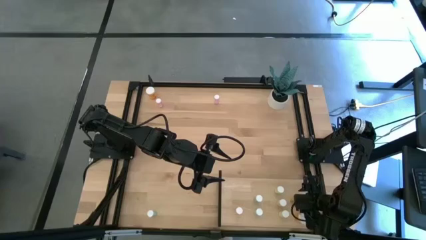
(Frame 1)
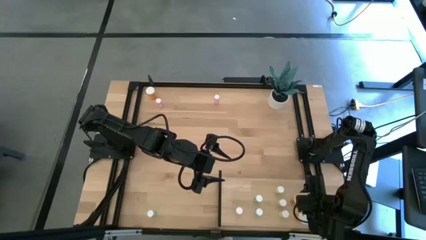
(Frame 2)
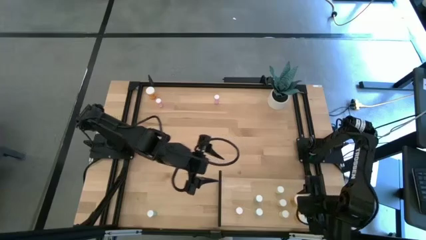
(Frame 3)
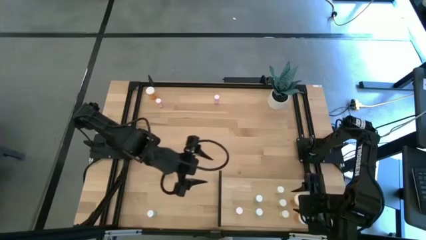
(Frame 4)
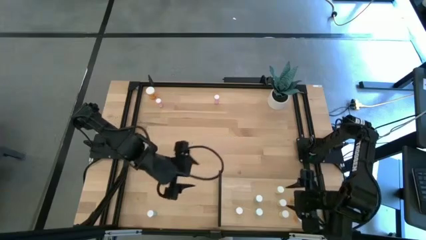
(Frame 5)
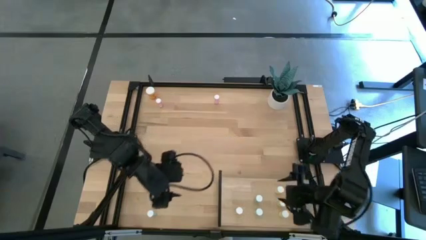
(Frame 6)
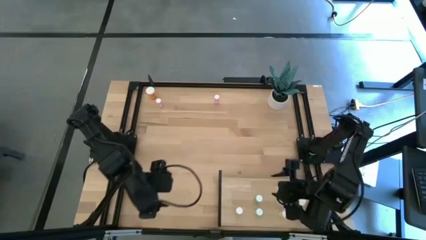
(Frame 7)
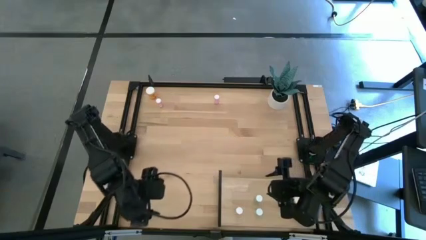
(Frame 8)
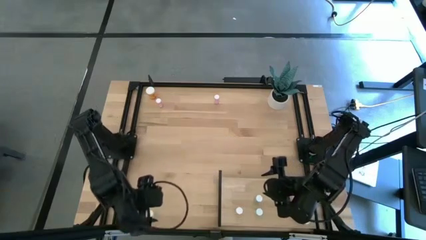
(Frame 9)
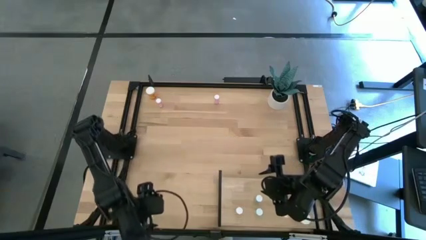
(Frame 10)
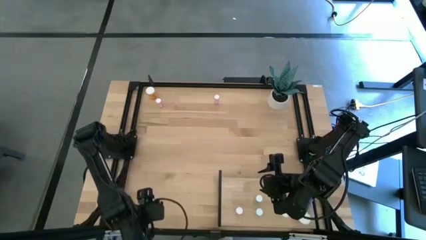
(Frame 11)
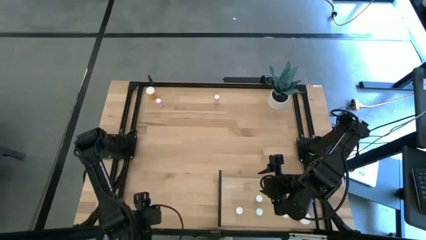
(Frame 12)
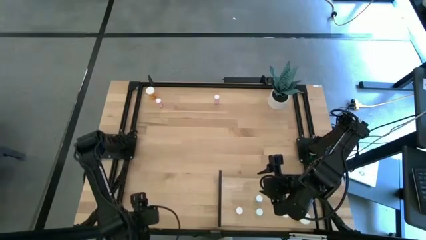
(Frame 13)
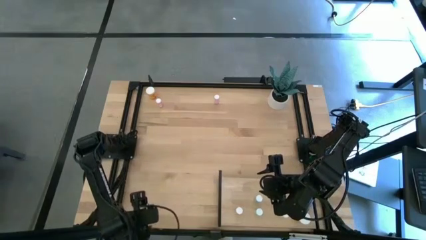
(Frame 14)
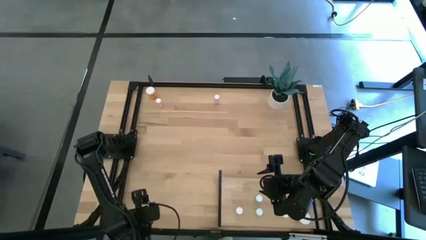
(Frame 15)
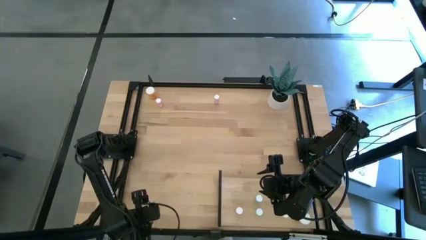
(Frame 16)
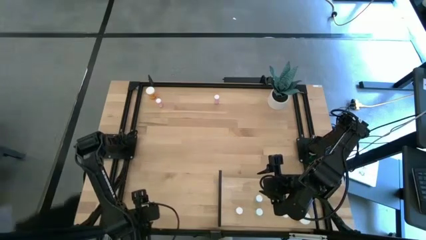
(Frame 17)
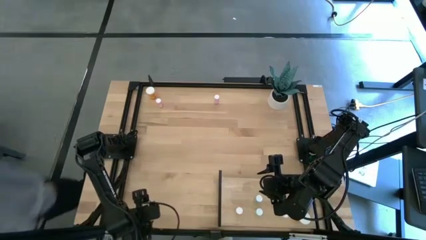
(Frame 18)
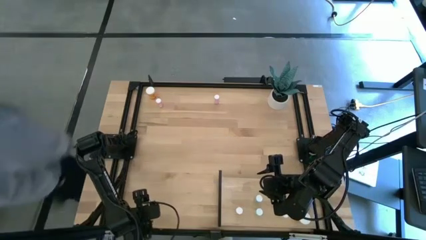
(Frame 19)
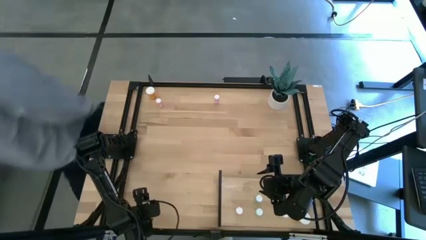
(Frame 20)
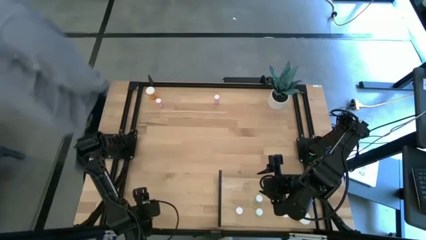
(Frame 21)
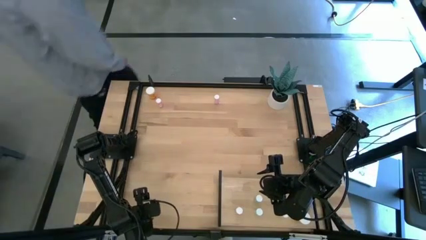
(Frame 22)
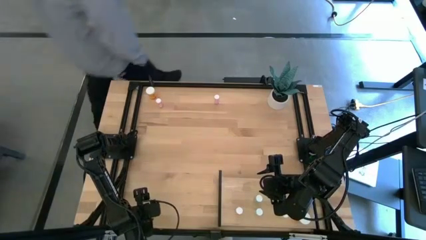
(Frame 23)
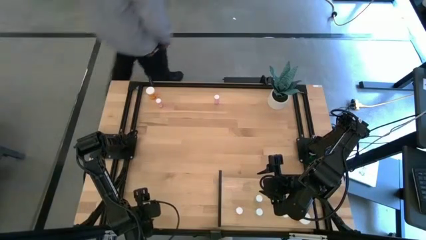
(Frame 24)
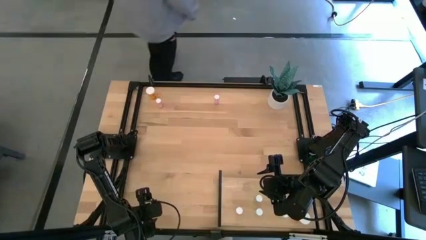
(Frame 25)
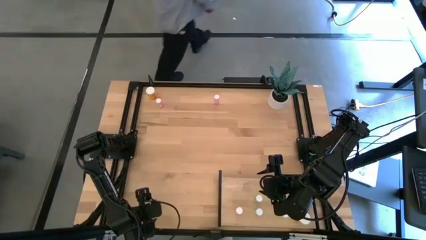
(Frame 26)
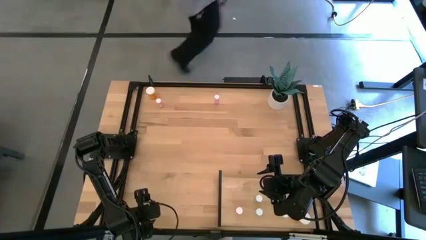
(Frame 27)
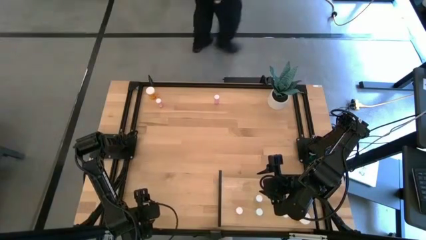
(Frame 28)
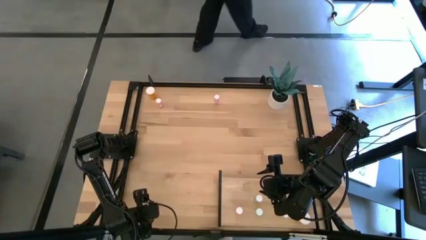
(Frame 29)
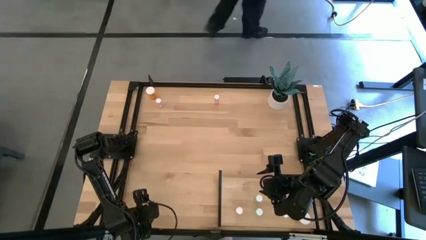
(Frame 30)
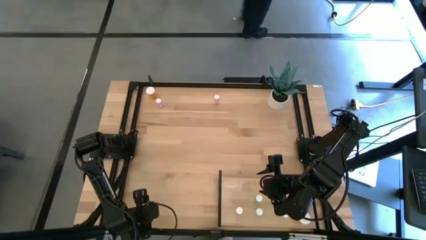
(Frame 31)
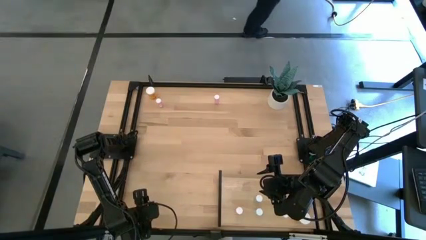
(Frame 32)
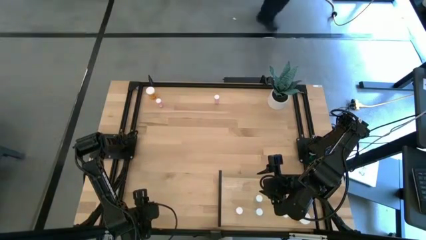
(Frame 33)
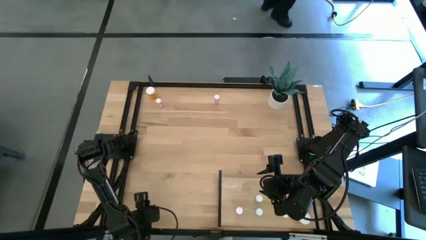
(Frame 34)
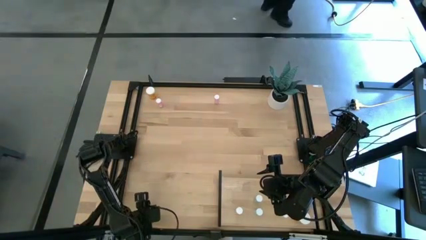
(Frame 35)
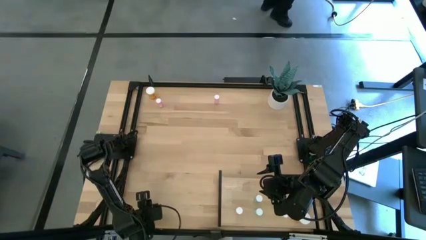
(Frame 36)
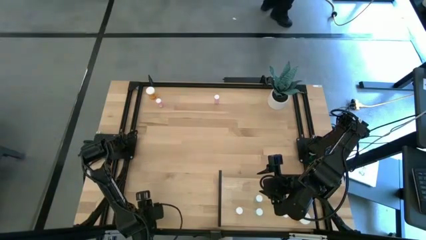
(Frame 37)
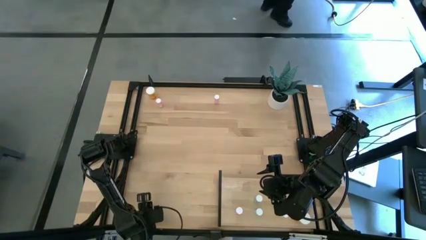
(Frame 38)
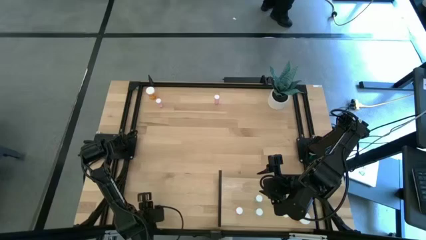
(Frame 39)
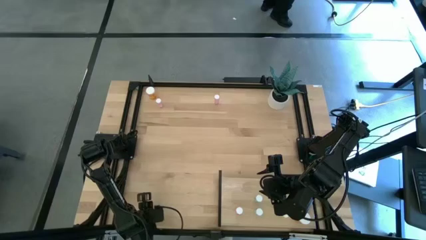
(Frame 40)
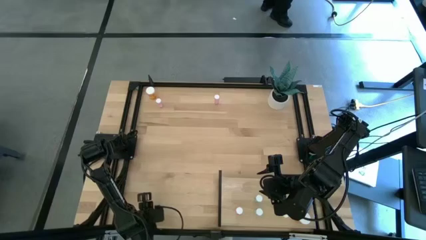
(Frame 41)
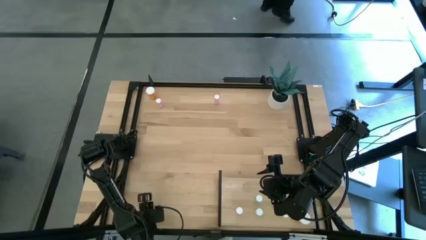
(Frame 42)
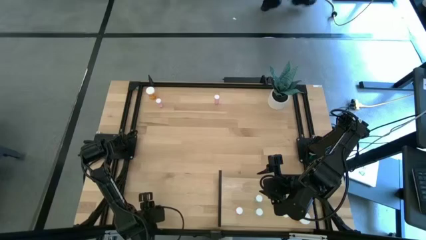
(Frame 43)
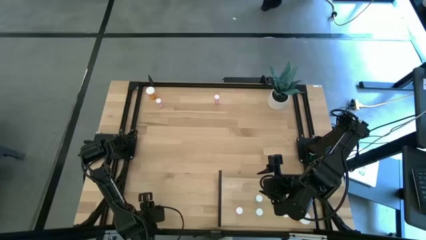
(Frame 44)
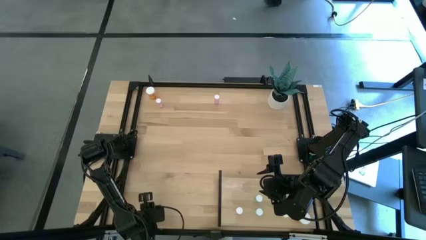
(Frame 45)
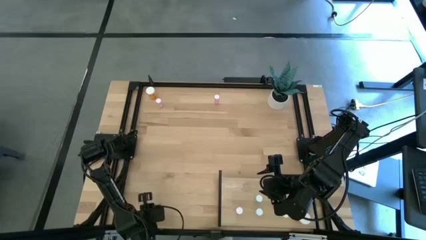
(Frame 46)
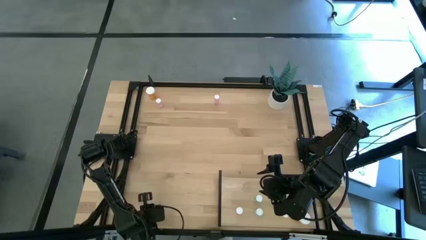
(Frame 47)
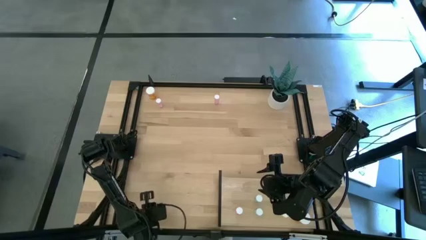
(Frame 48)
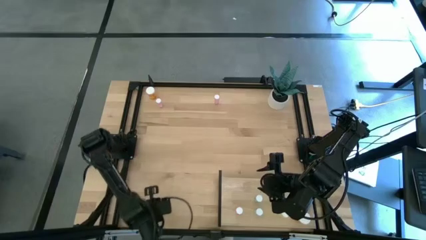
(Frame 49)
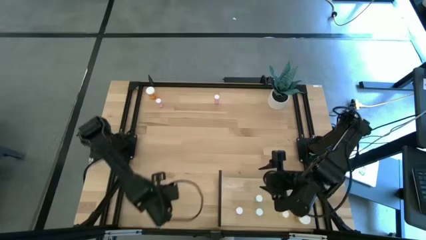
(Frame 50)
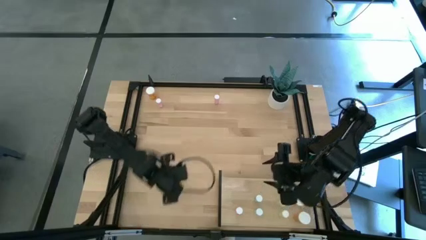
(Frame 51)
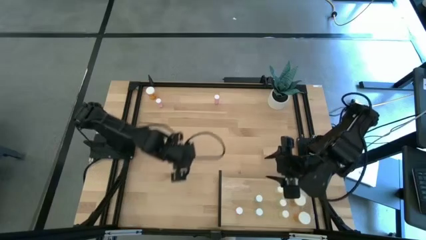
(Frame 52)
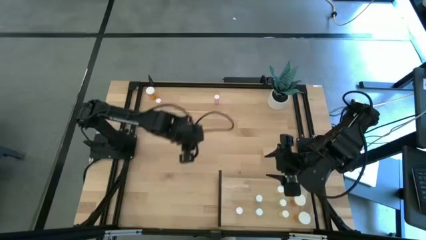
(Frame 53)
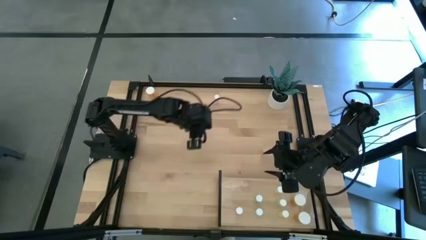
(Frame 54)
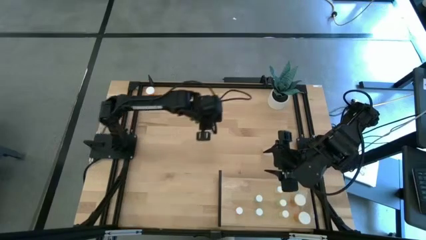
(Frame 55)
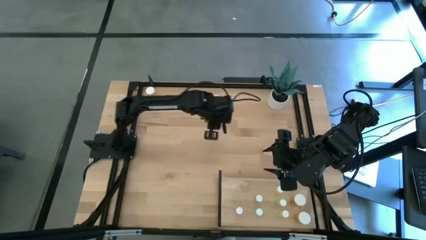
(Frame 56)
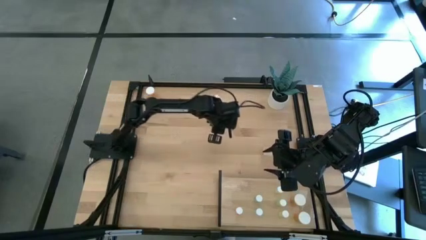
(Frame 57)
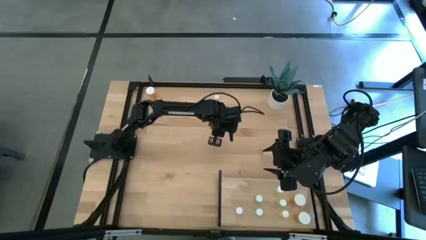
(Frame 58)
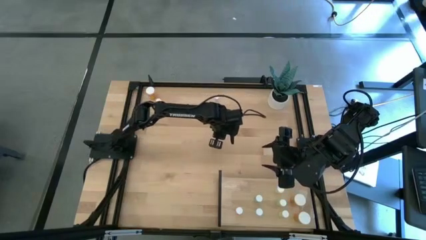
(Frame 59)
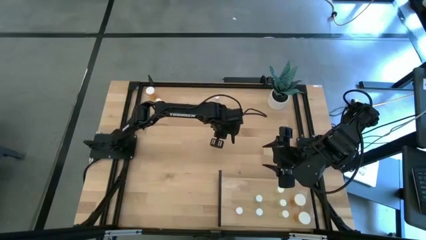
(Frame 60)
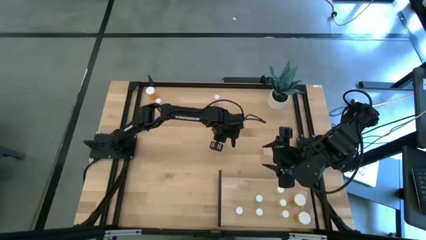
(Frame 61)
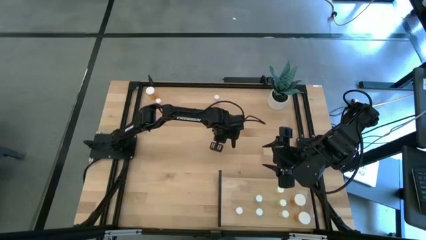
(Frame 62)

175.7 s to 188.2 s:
Task: Pick and place medicine bottles onto shelf by color
Put the green pill bottle on the shelf aligned with the other green pill bottle

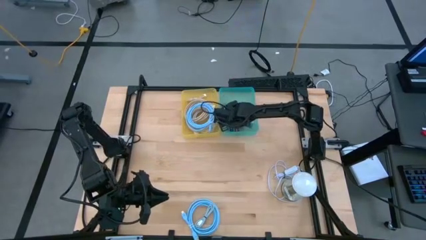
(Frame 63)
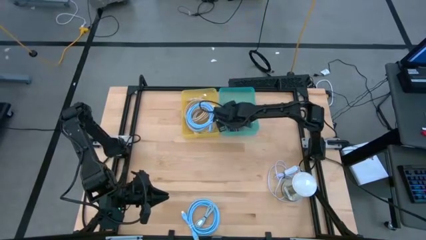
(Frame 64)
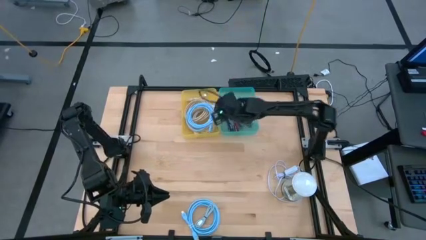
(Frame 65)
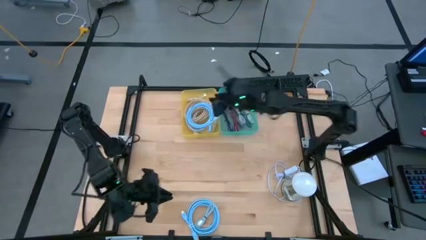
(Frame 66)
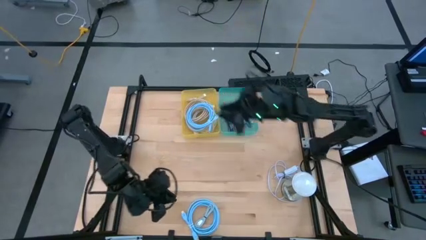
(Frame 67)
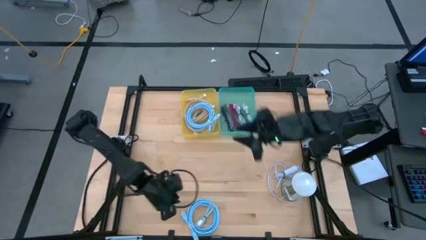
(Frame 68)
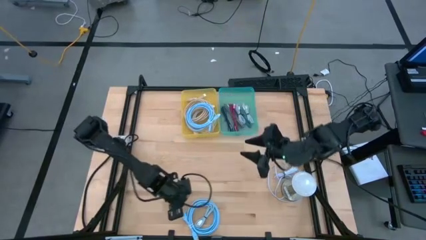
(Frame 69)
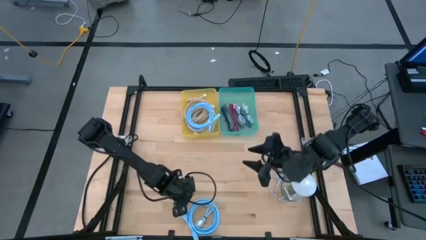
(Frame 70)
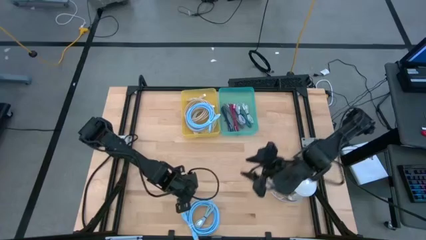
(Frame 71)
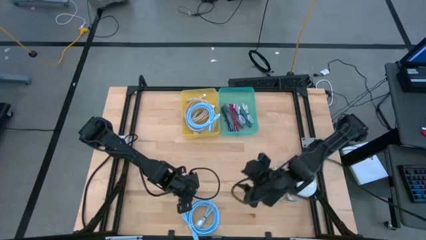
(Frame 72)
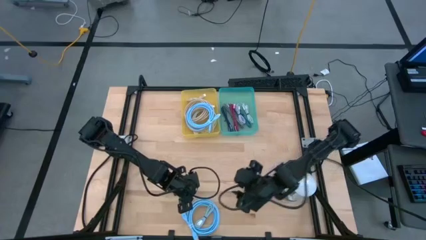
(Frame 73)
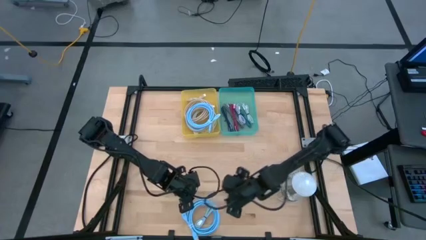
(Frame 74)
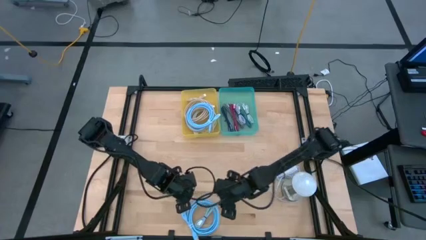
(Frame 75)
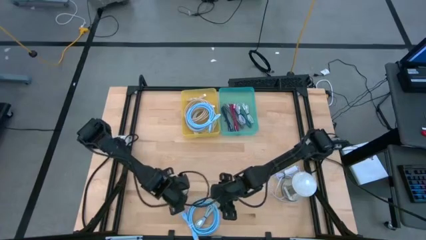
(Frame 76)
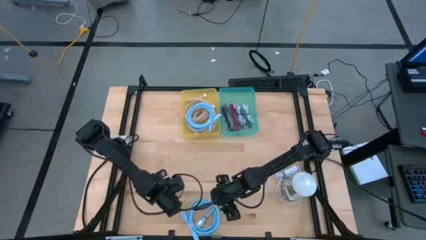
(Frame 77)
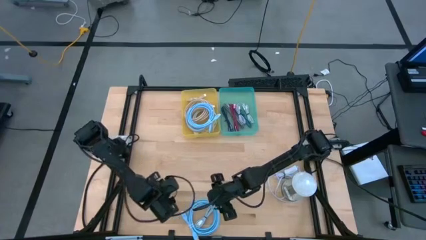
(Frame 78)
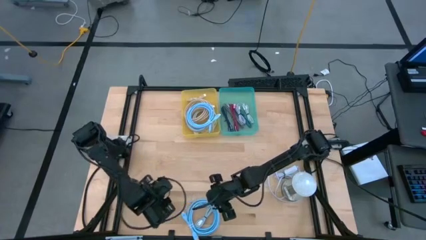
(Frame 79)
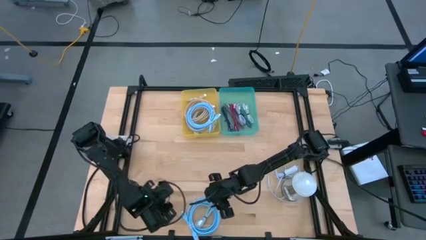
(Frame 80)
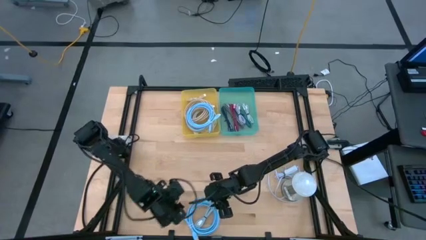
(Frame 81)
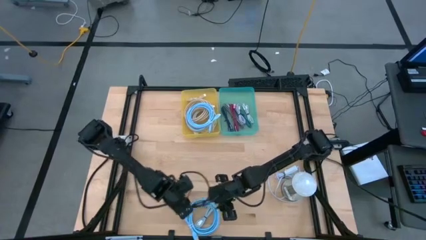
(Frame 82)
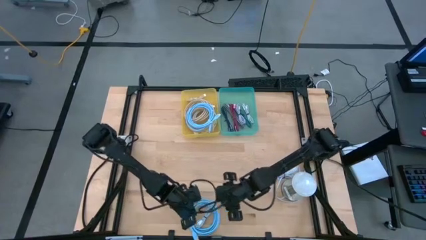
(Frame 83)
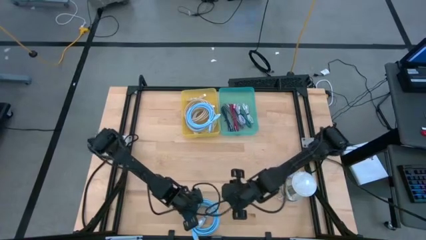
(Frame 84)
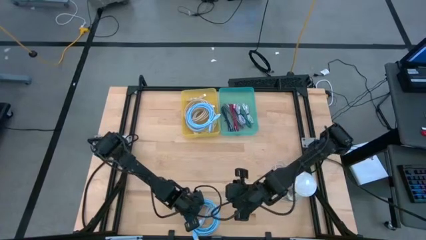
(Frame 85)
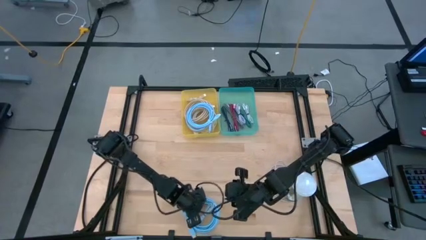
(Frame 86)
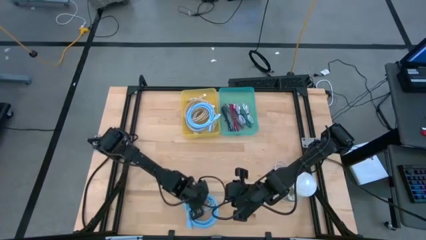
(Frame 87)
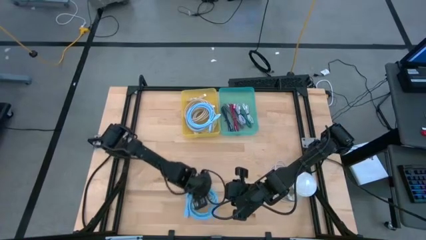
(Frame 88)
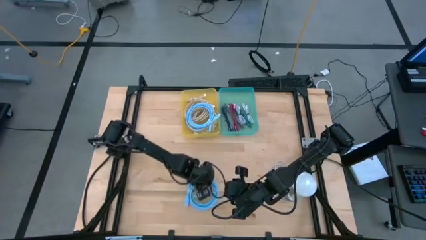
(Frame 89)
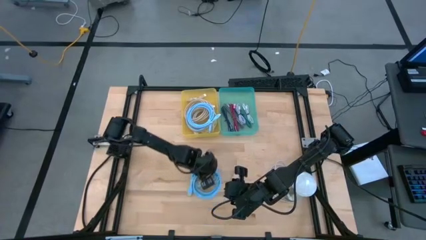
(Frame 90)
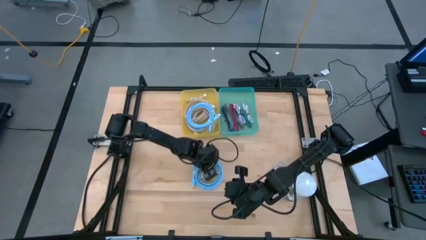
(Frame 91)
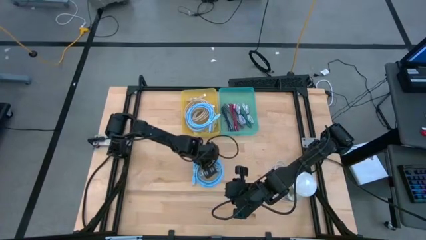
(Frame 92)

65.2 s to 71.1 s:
Task: Pick and place USB-C Cables
Adjust the cables
